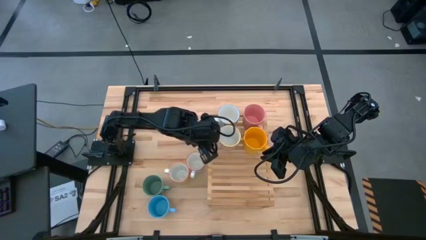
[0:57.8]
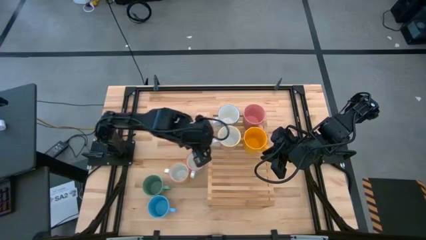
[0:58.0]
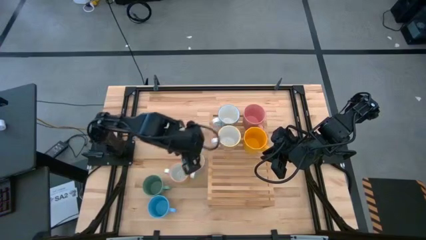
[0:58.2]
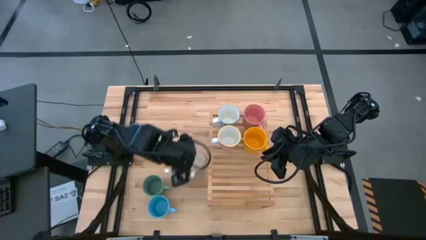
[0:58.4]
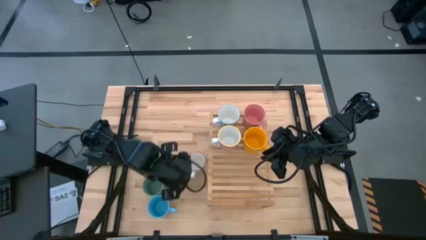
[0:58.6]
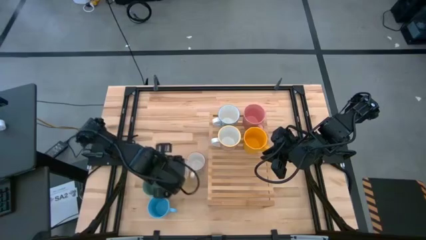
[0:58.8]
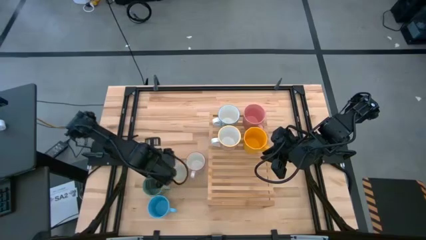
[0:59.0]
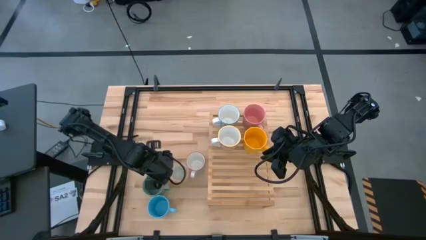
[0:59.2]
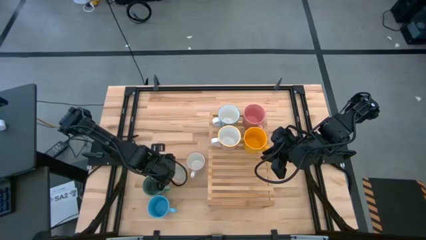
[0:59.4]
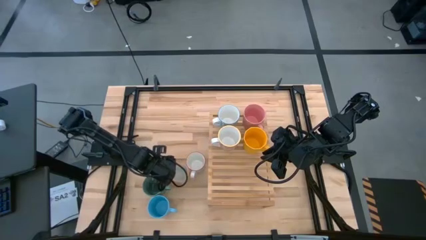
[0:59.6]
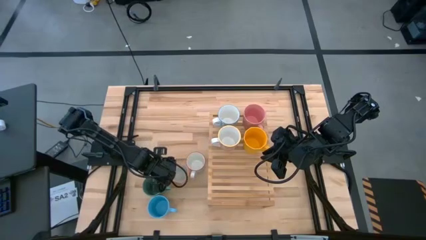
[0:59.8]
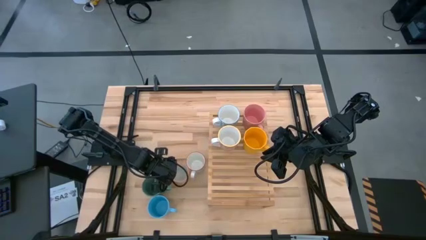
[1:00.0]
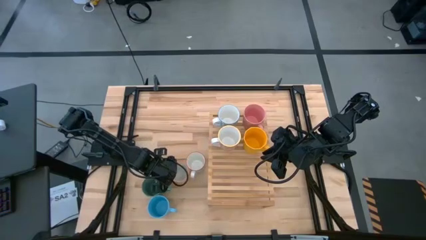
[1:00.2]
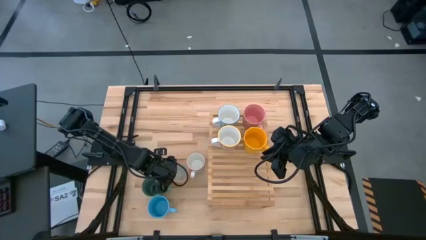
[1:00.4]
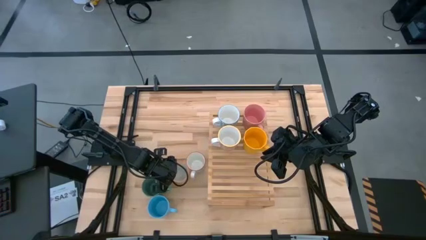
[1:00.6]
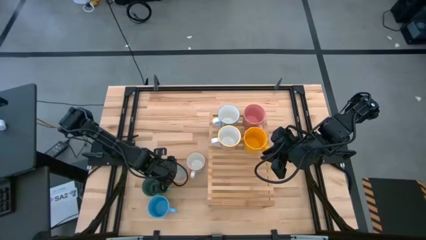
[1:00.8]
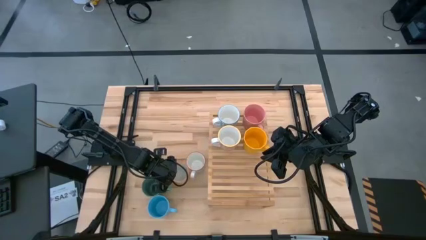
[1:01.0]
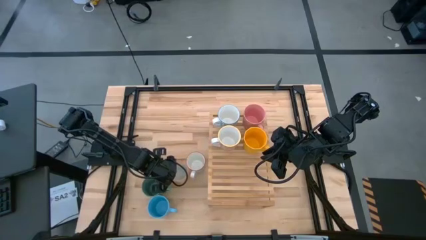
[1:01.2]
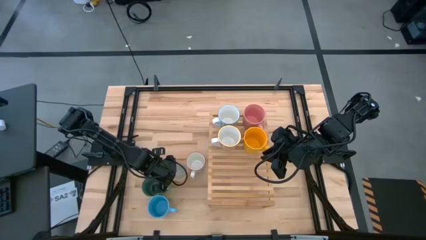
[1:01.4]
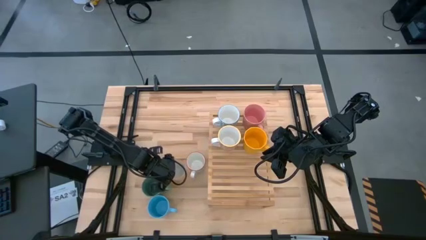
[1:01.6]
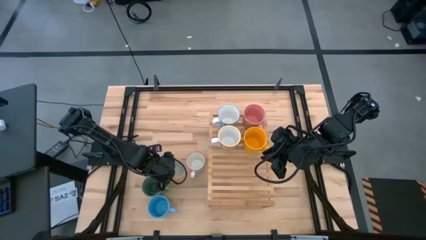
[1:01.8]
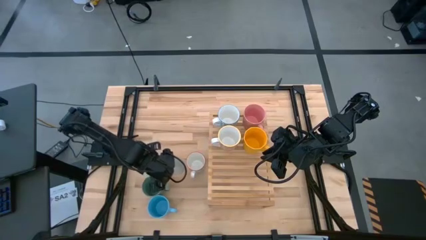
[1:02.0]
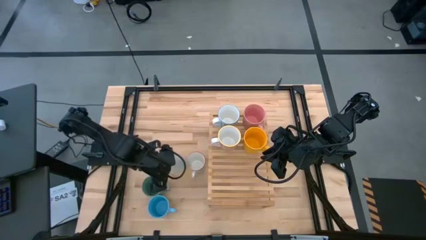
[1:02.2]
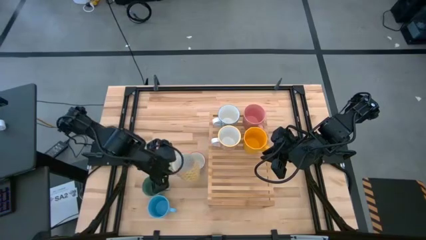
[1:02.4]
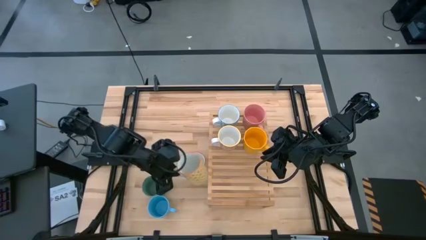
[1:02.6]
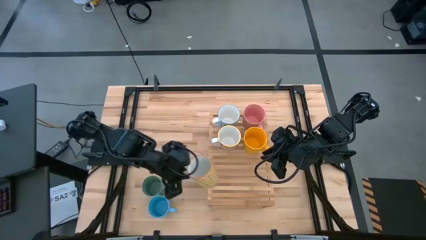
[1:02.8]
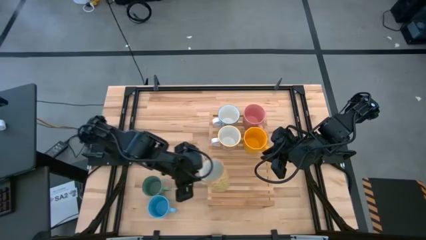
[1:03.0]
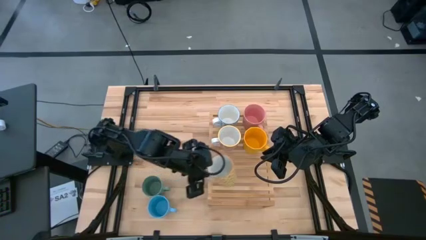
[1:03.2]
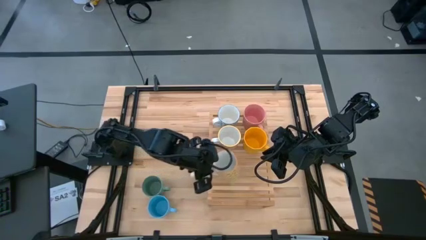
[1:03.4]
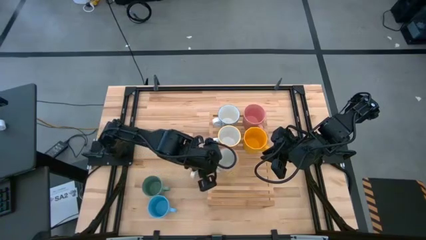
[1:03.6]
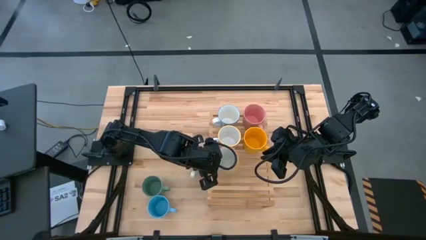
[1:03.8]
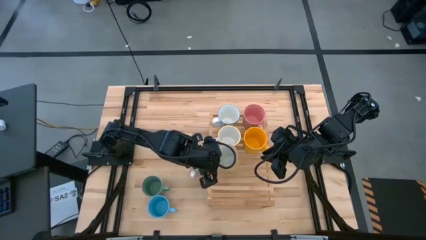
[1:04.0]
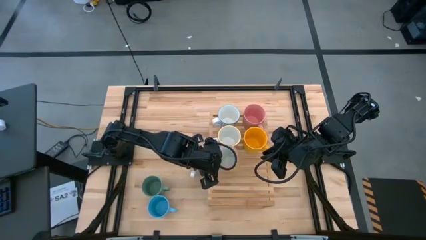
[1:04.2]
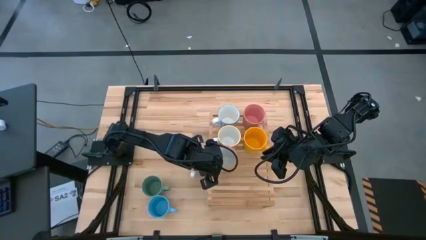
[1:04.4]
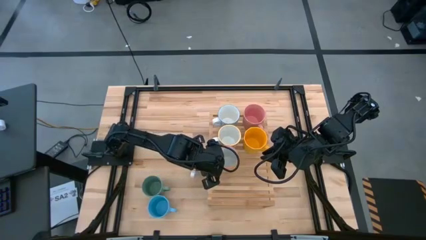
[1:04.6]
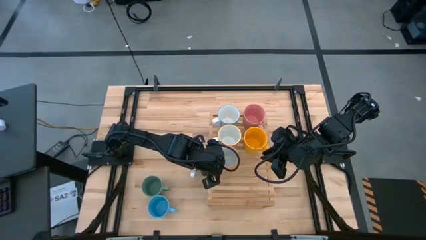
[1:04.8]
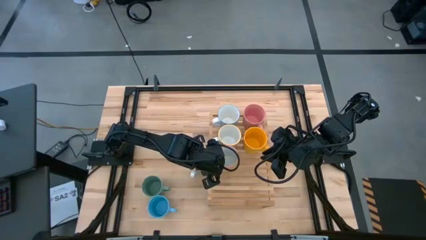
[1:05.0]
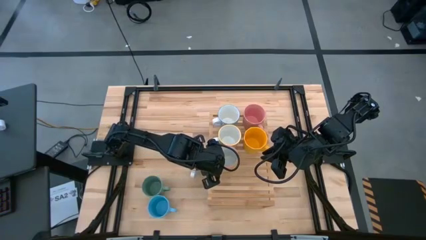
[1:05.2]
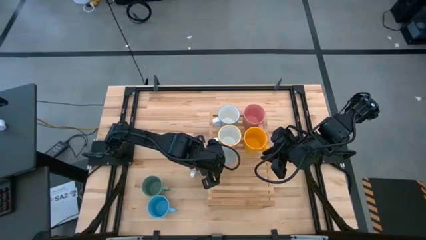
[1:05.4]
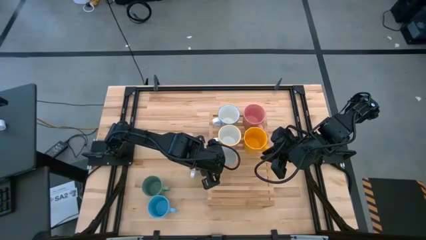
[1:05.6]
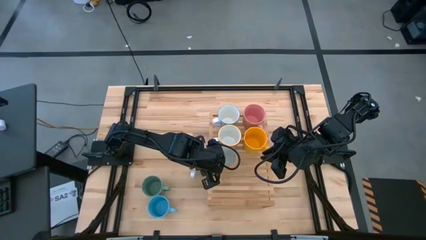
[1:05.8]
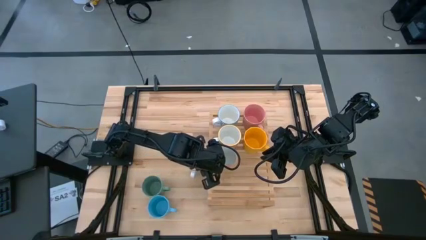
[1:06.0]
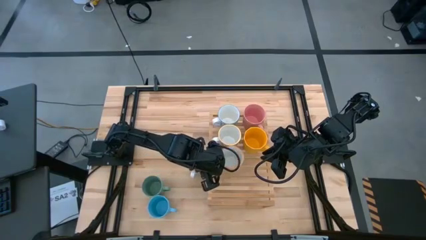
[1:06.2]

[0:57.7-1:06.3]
Task: Place coffee mugs
Put the yellow patterned mug on the shelf

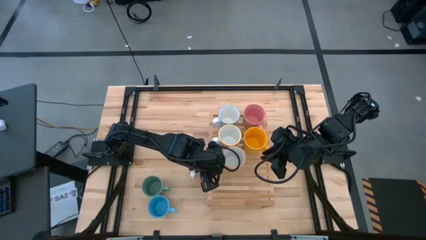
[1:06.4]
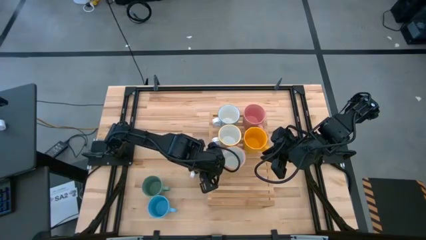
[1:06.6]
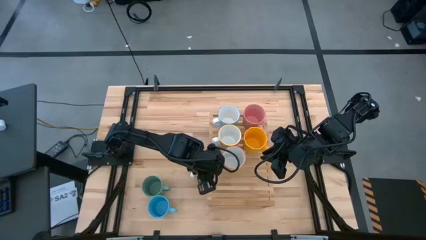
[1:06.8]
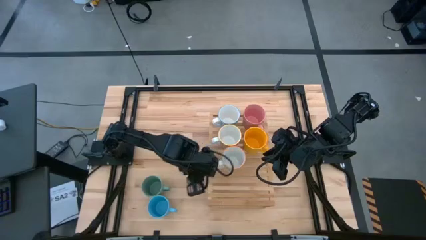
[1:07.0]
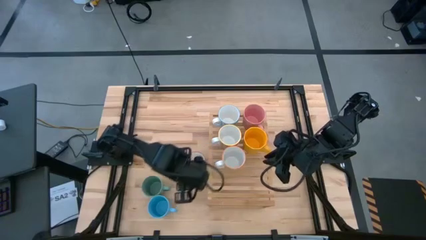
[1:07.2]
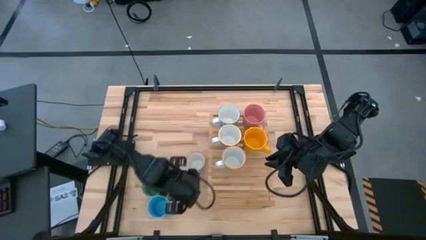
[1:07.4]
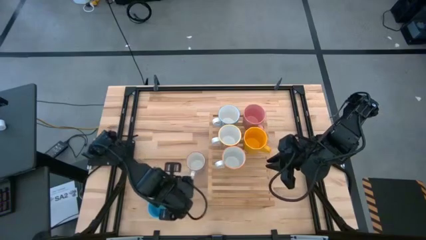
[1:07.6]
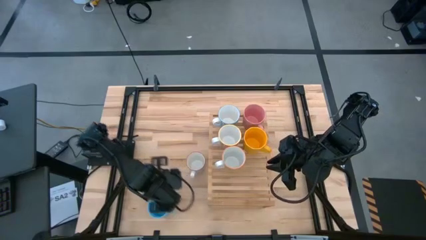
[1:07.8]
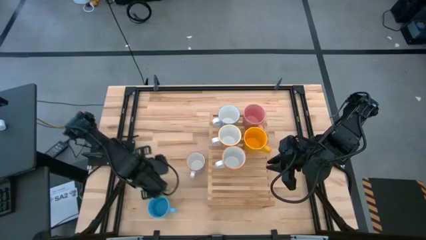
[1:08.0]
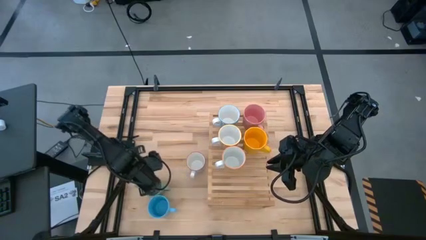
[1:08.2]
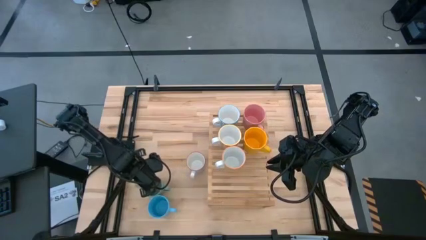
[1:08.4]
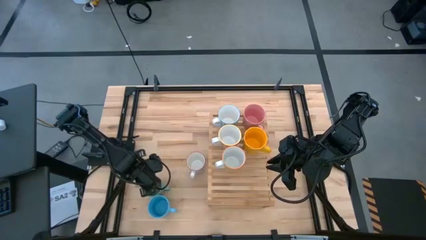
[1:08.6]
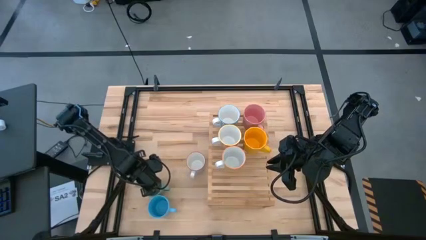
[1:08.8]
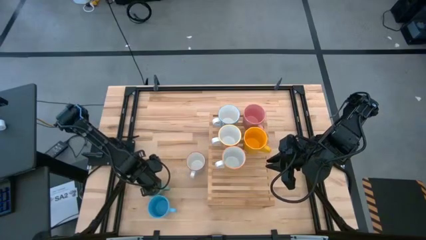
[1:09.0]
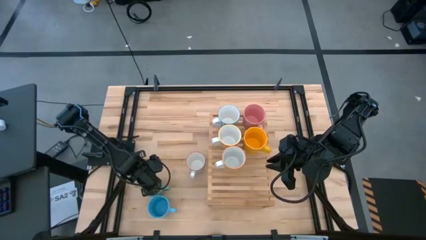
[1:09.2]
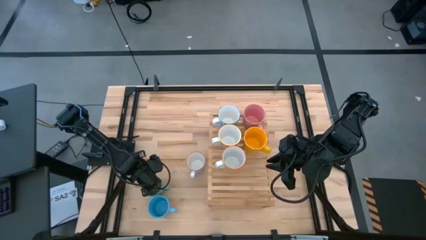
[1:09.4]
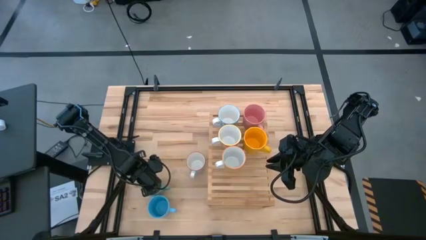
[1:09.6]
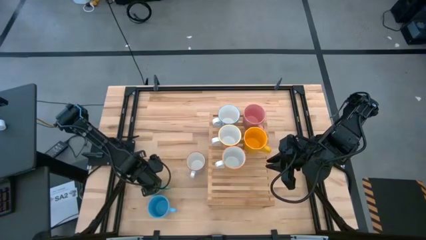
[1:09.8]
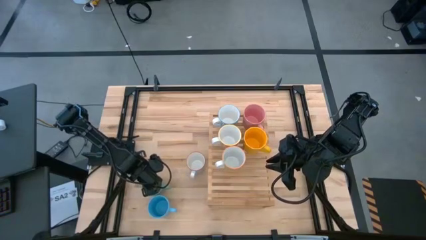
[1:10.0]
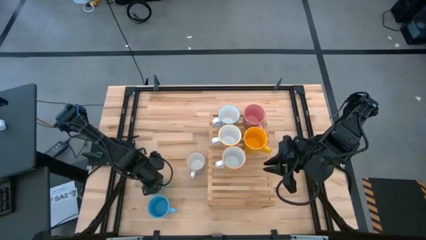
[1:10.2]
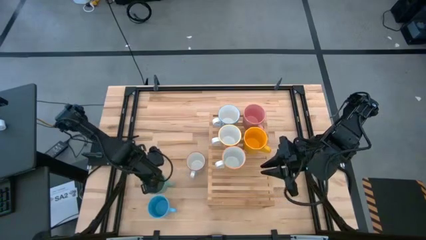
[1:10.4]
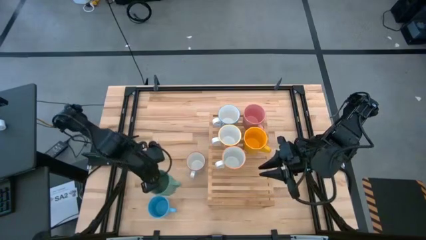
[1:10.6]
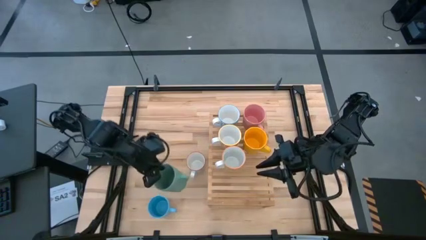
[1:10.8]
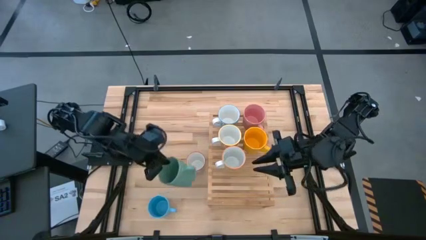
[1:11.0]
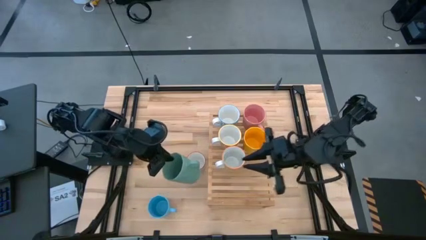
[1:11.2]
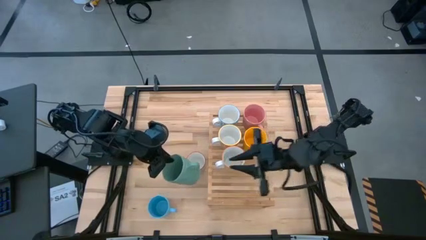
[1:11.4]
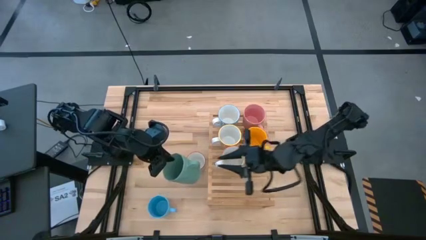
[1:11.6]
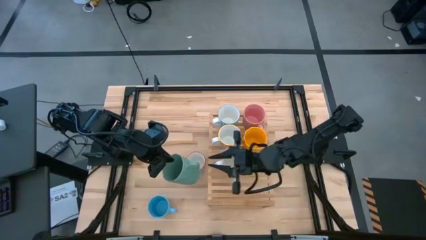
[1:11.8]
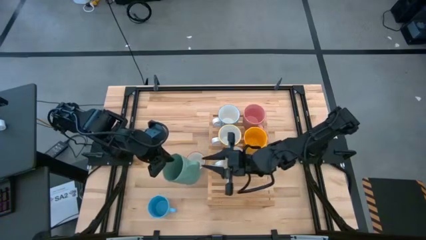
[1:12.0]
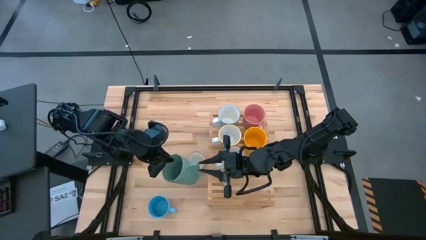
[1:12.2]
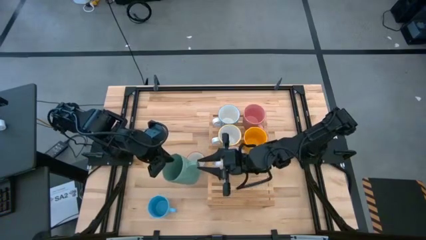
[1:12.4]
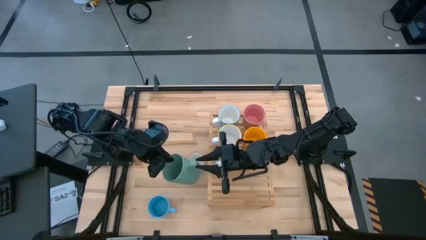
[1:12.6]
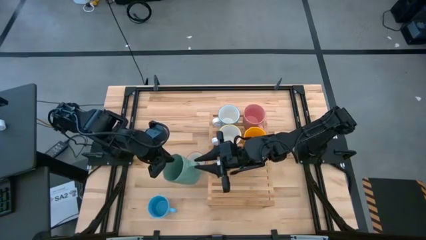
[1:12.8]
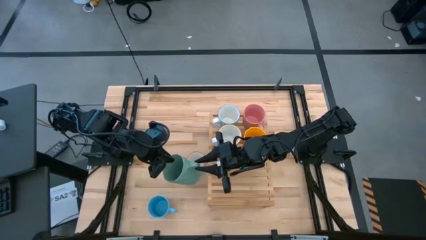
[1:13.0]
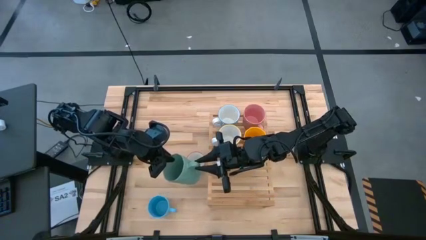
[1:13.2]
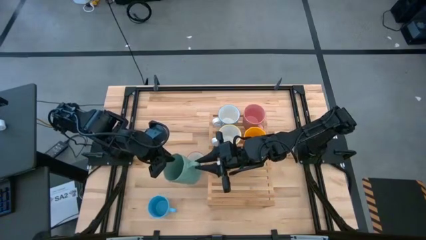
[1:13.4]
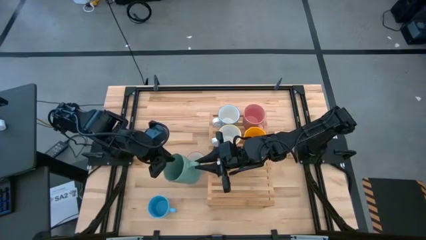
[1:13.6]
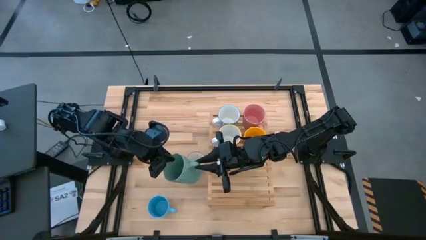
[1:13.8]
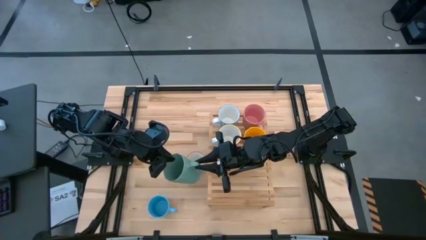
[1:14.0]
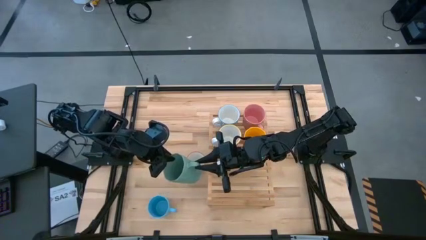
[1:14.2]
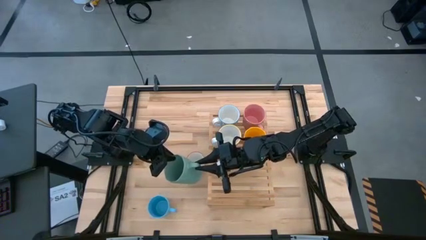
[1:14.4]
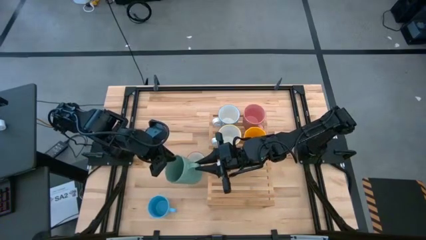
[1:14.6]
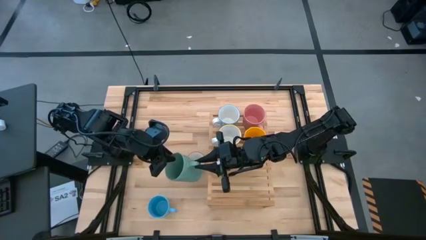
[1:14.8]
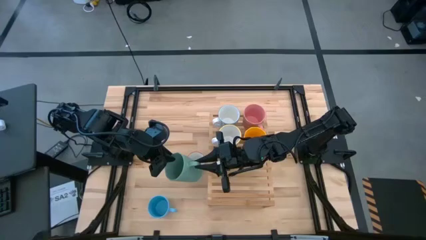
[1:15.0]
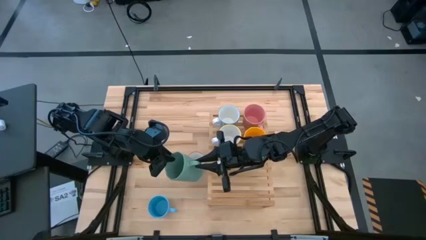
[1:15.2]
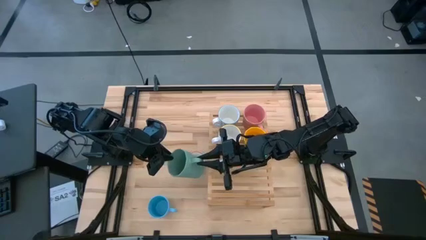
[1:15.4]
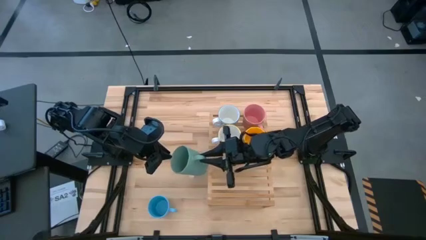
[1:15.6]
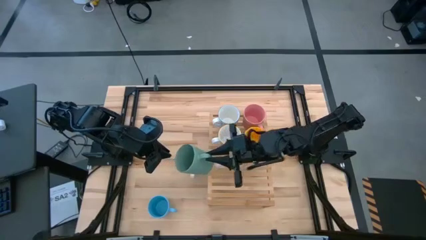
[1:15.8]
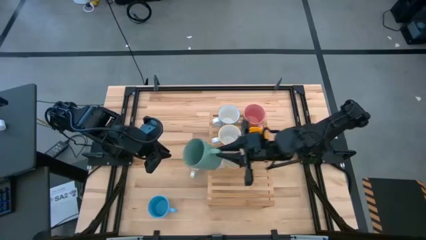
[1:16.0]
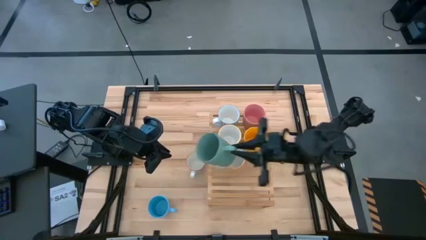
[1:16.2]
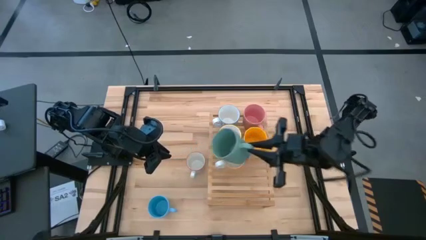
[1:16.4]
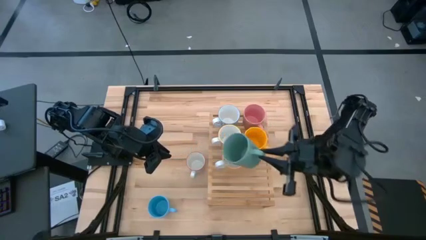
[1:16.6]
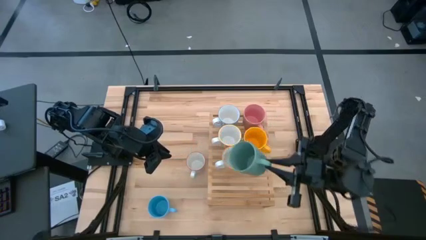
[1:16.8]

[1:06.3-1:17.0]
Put the green mug on the shelf
